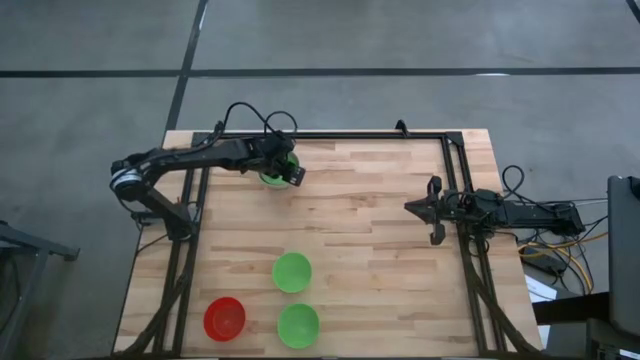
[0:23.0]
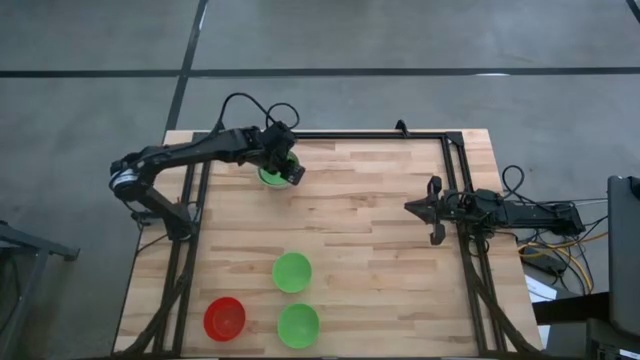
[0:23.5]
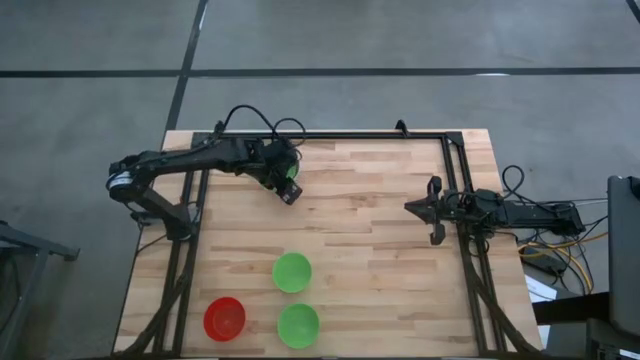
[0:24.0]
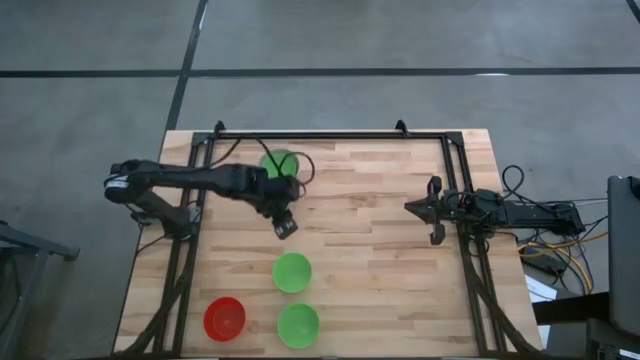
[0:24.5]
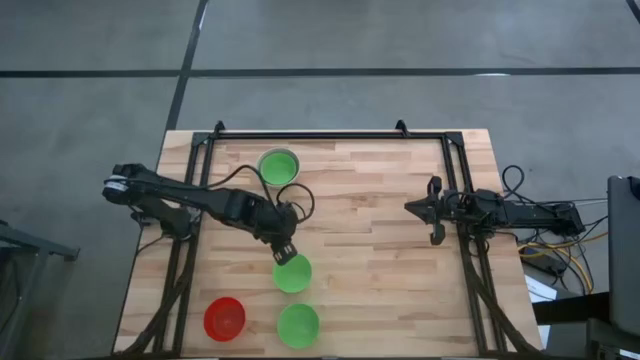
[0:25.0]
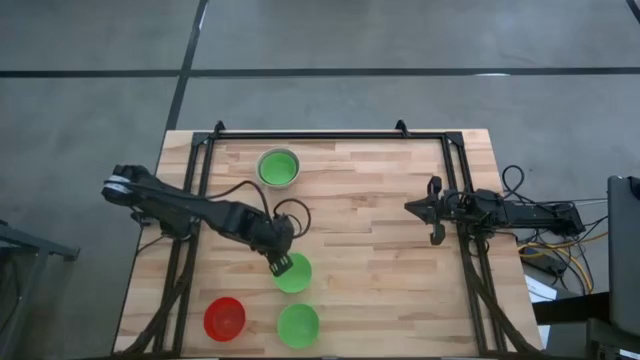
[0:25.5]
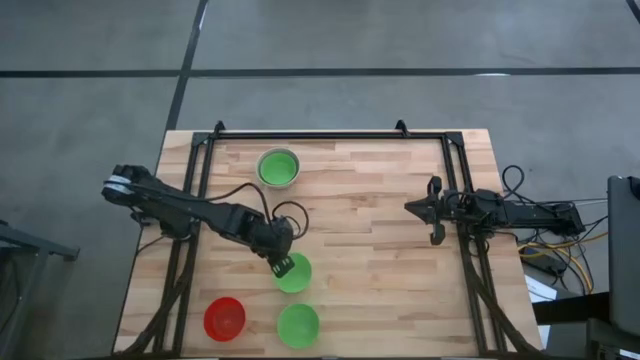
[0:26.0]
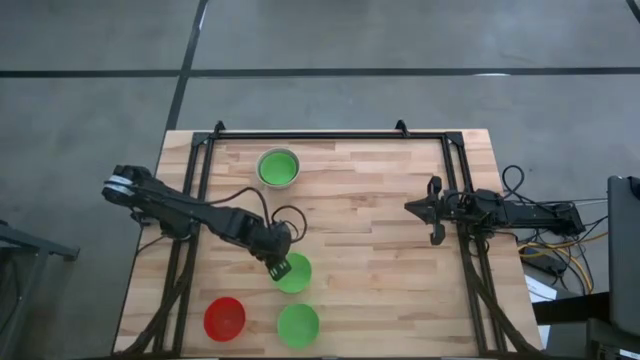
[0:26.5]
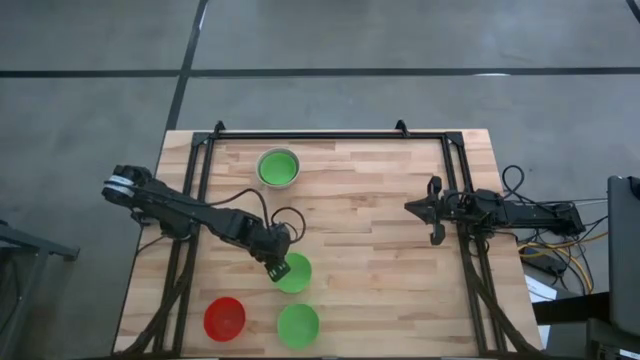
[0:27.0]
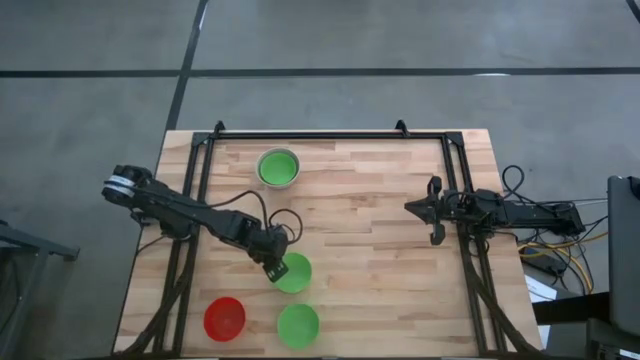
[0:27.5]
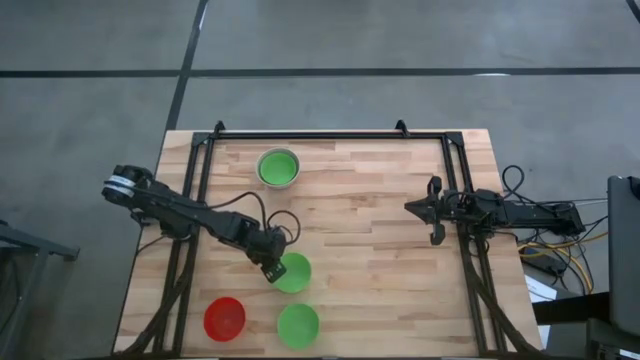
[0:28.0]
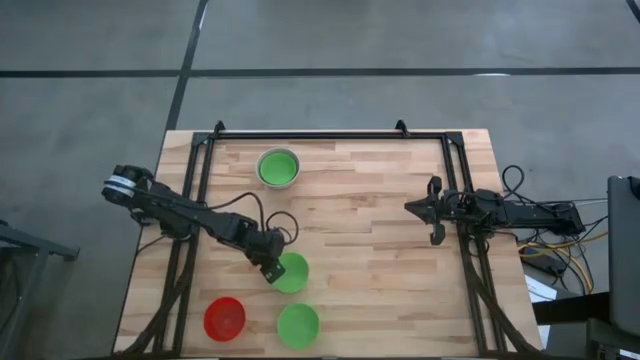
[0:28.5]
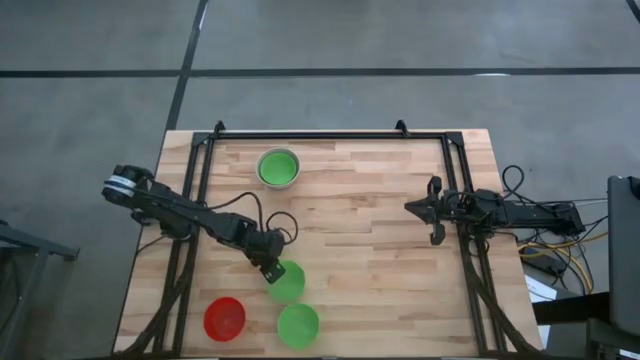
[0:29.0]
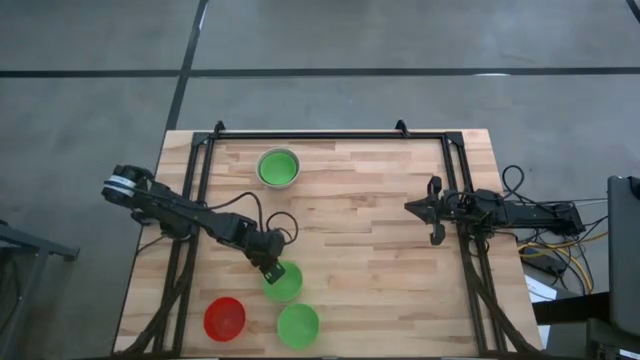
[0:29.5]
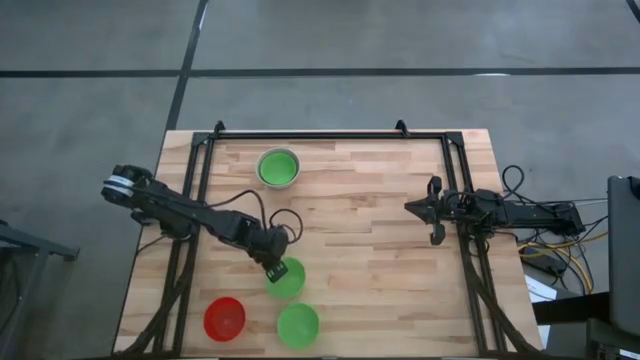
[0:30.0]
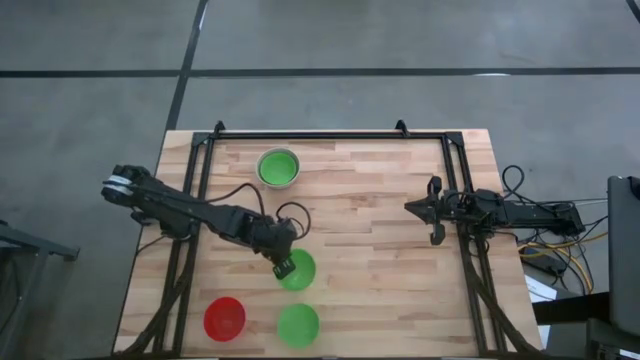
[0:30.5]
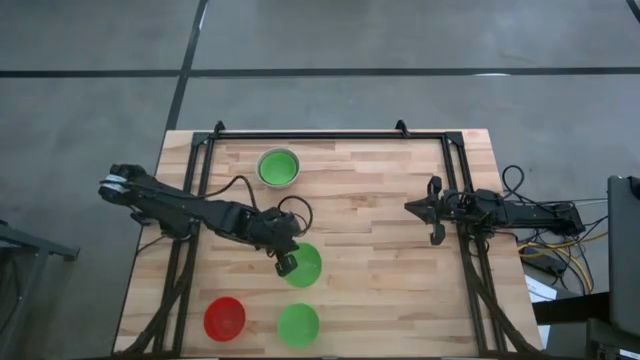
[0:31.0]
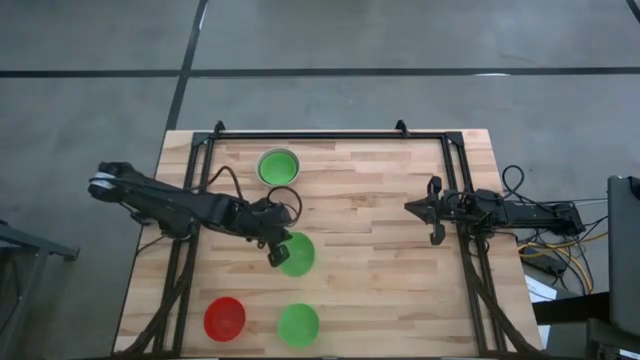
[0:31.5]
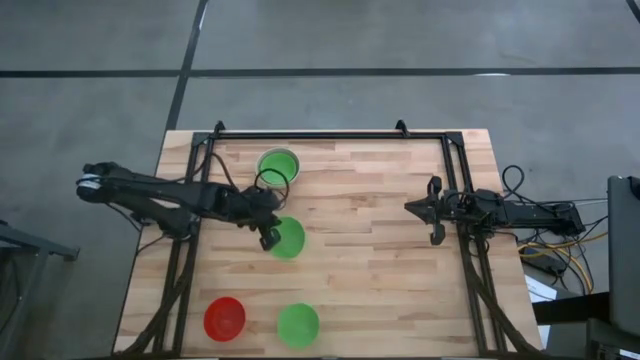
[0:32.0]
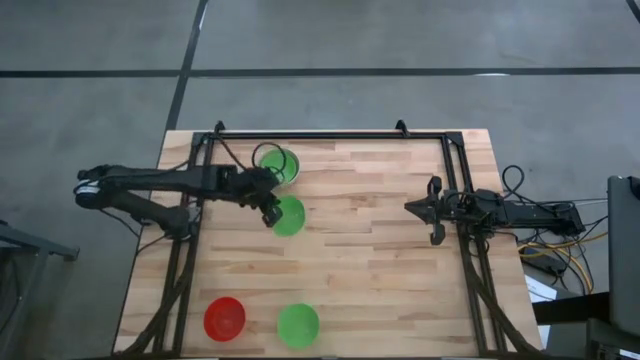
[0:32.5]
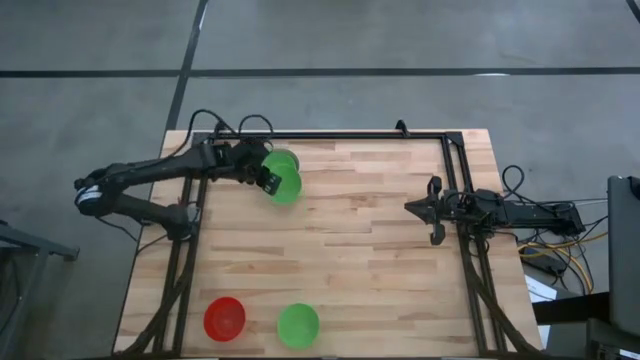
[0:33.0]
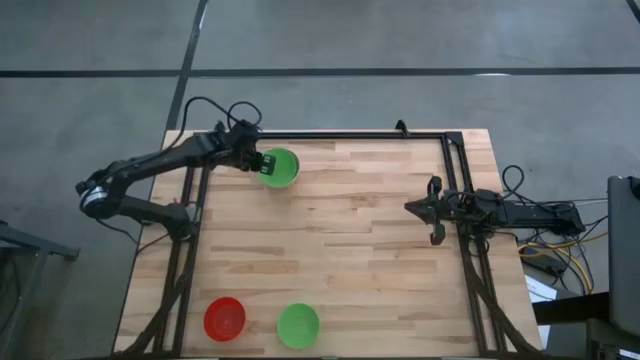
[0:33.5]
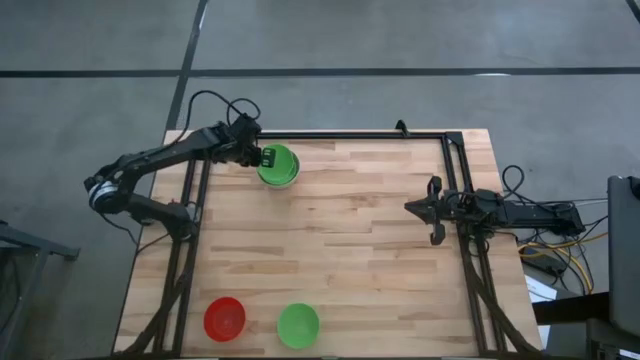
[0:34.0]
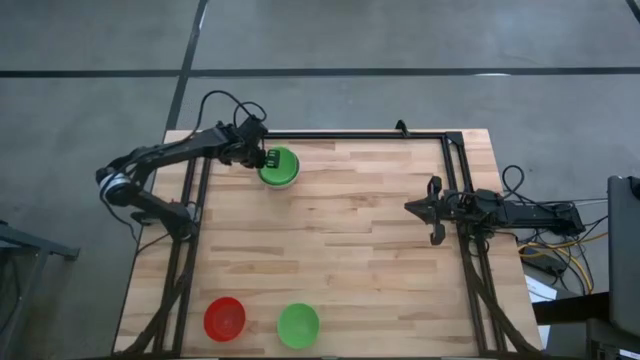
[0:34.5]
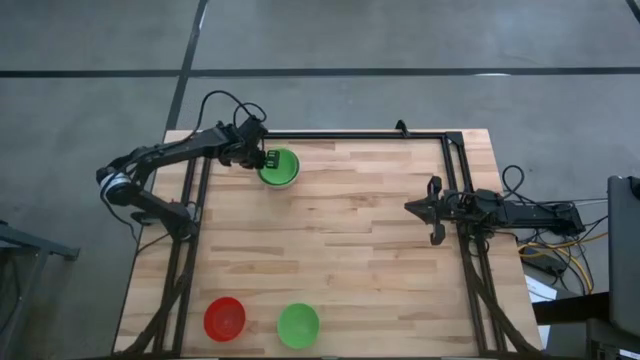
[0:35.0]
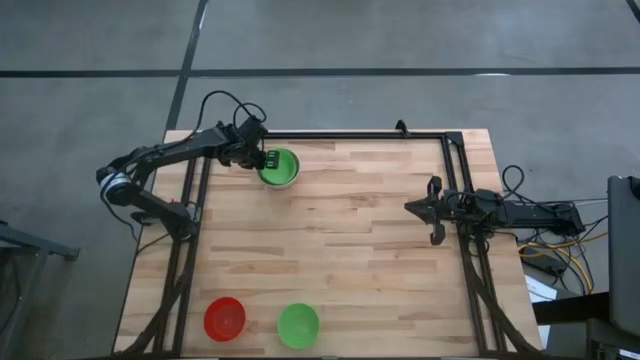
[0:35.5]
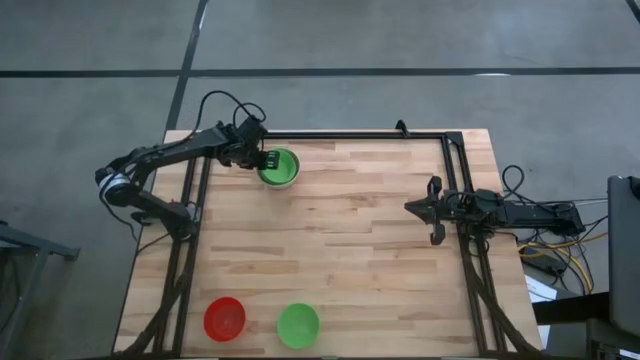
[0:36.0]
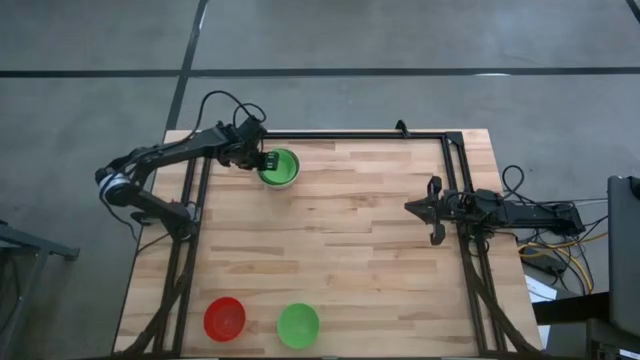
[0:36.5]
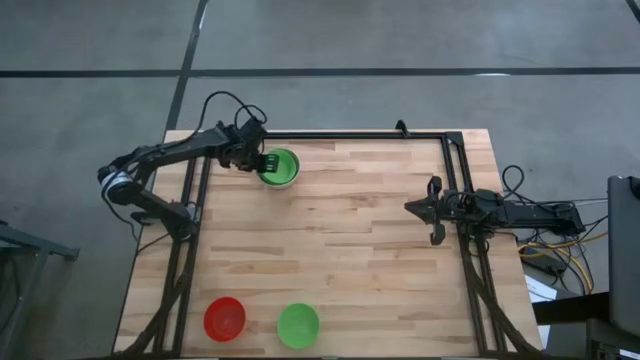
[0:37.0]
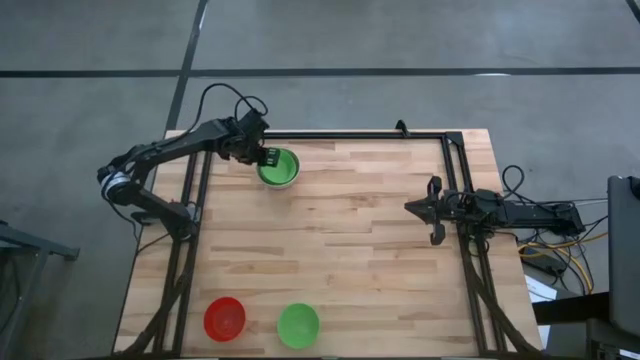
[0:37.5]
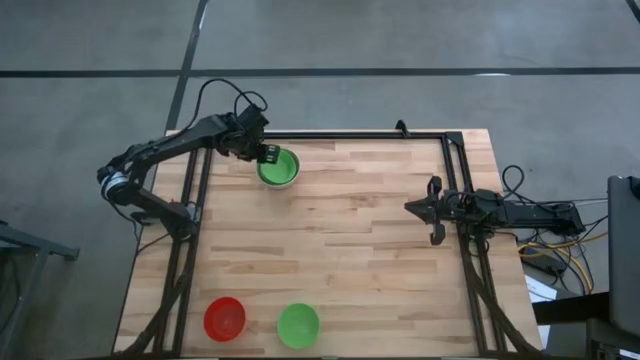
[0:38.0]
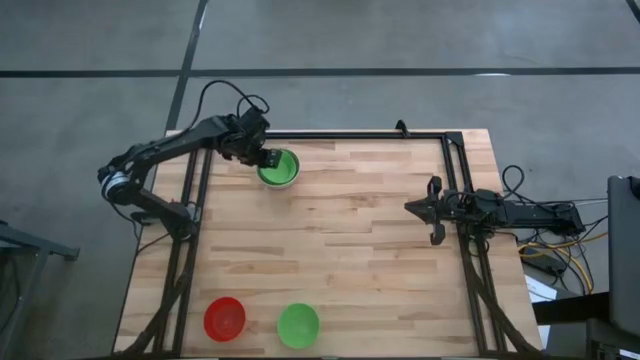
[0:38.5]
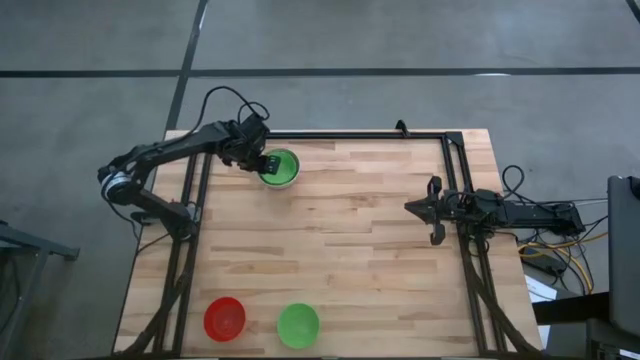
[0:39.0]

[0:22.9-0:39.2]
Stack the middle green bowl on the stacked green bowl
